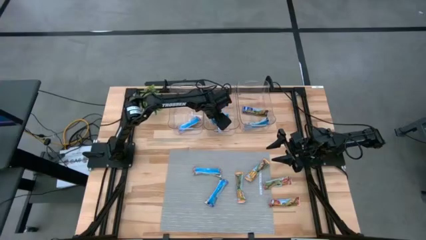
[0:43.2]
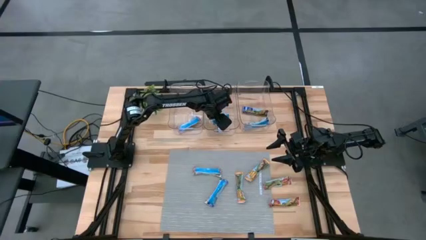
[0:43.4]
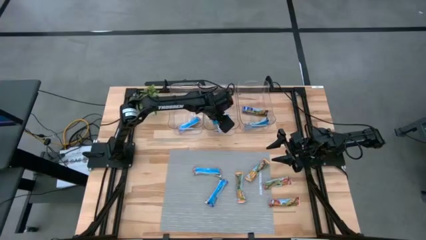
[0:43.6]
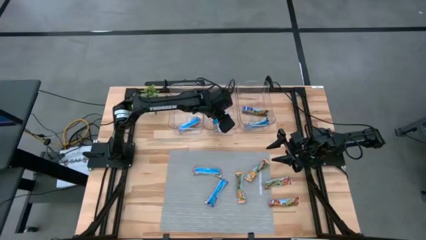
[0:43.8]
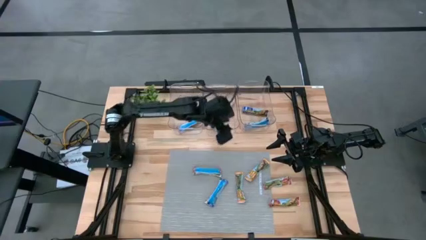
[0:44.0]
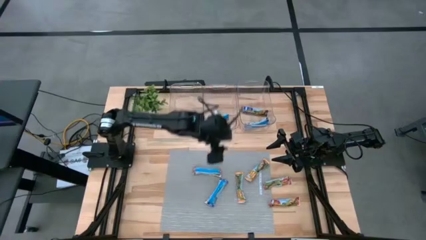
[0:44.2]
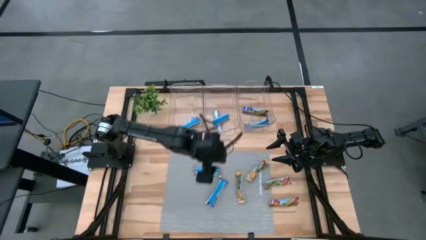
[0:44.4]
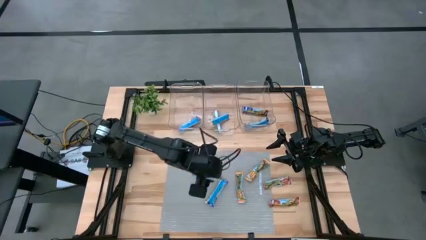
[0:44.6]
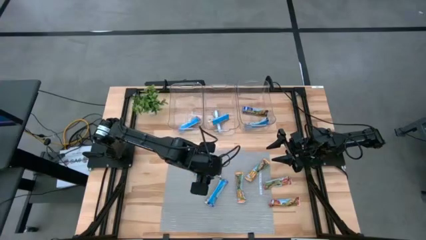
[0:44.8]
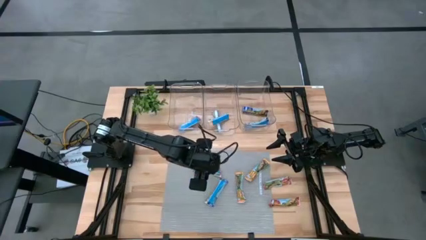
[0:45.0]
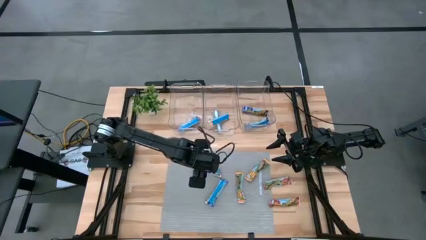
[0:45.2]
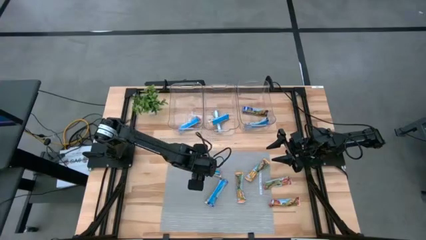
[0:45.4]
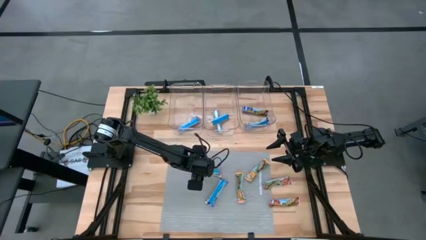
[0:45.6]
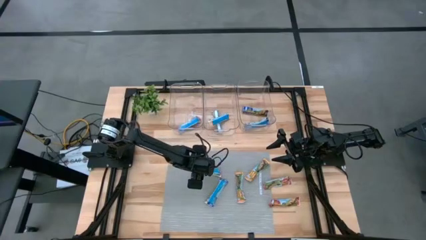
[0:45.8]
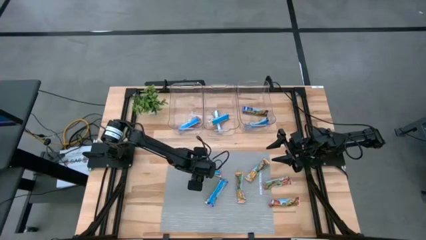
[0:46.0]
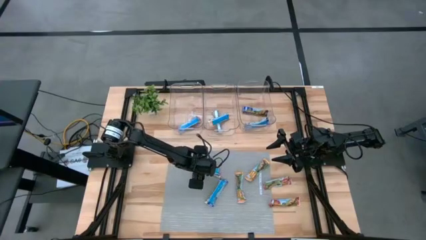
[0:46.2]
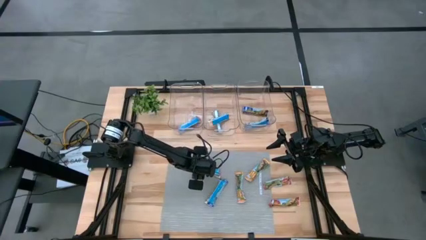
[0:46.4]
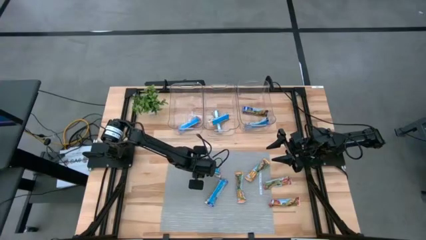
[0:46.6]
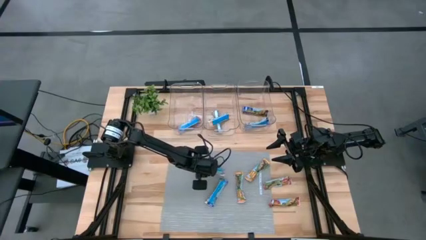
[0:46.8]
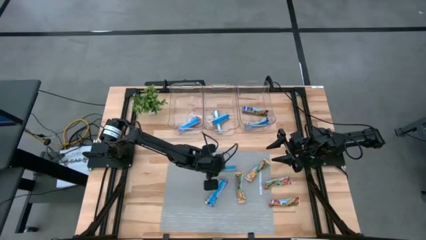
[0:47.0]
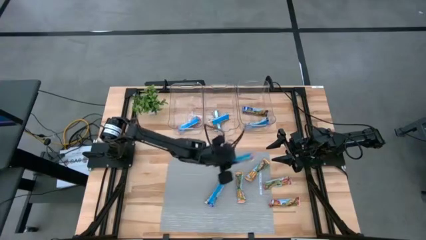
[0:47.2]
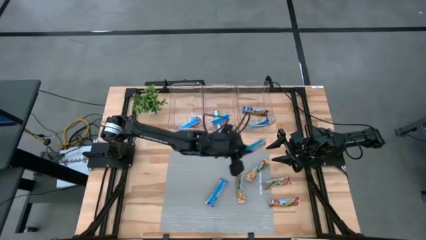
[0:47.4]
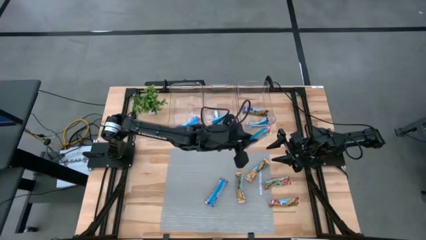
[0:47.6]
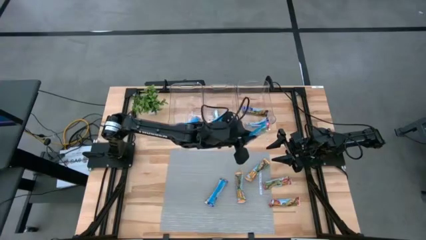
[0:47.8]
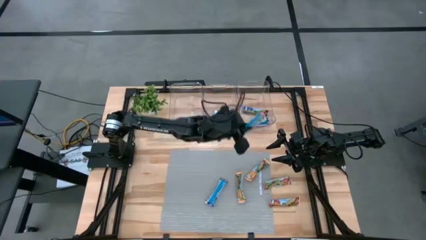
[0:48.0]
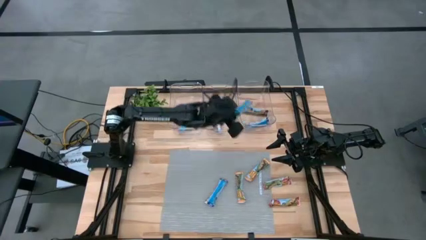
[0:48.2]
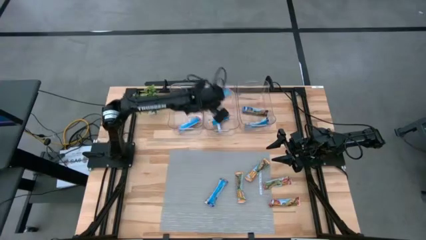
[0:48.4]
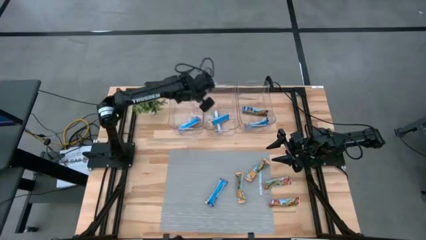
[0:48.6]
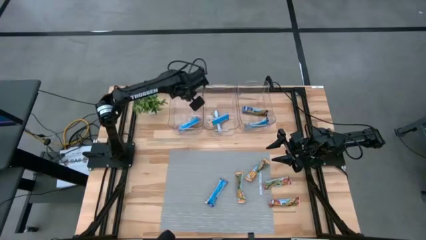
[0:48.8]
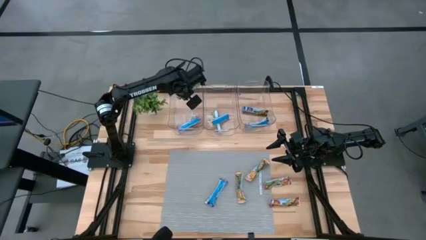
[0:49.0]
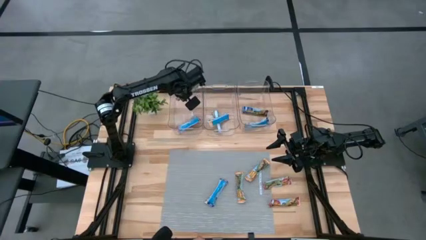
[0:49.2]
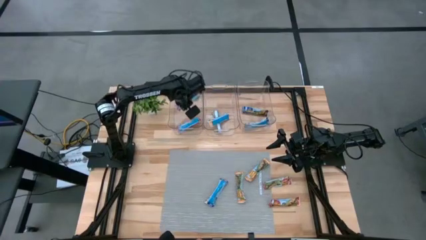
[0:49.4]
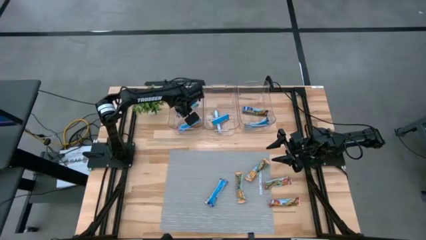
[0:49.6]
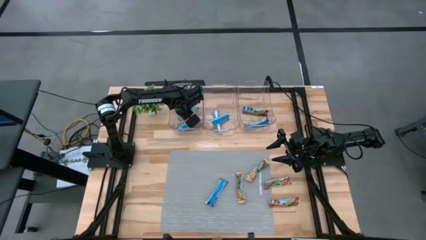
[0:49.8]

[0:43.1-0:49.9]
Task: Pick and place Granola Bars by type
Put the red granola bar into the left transparent bin

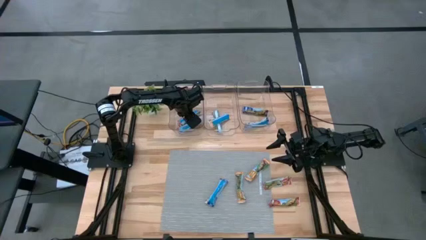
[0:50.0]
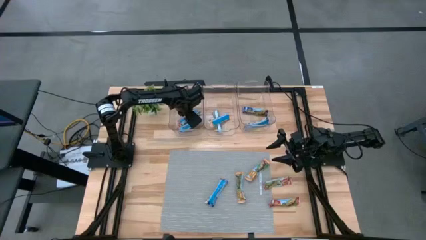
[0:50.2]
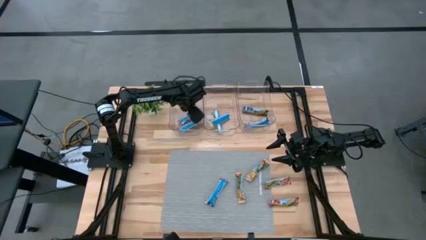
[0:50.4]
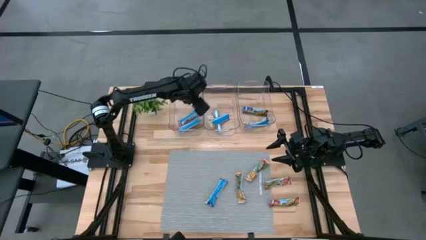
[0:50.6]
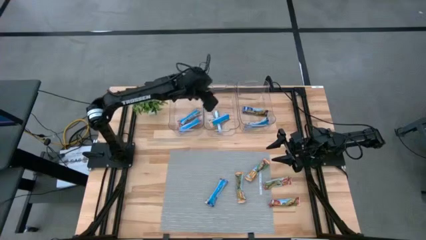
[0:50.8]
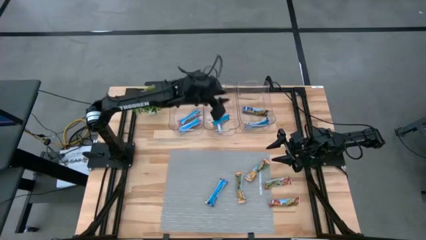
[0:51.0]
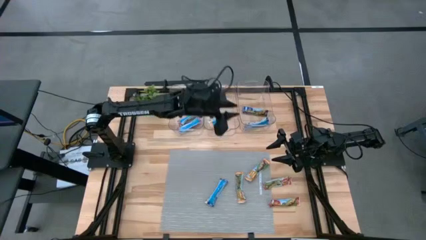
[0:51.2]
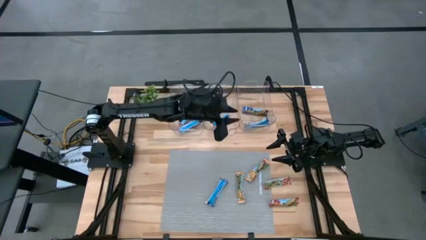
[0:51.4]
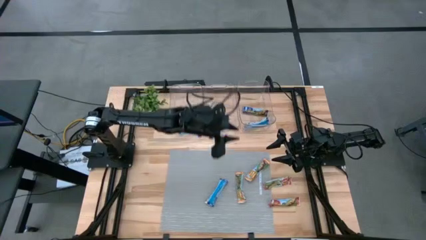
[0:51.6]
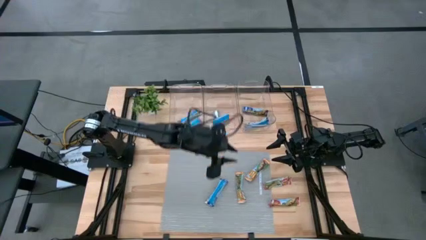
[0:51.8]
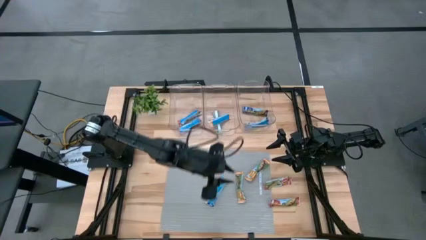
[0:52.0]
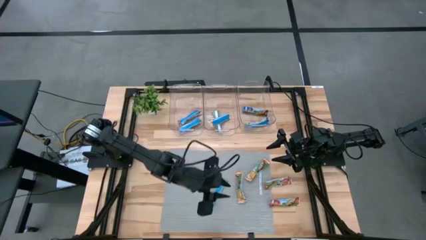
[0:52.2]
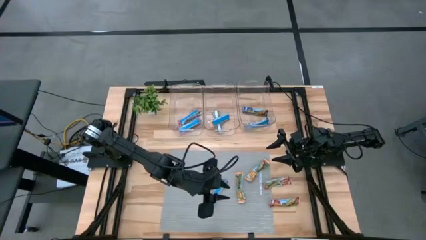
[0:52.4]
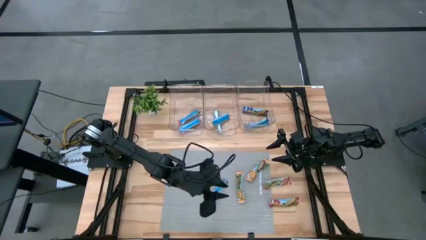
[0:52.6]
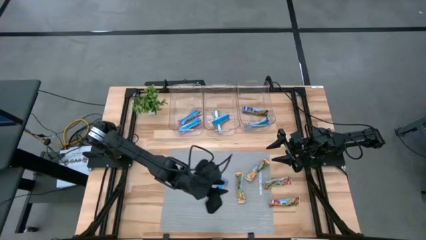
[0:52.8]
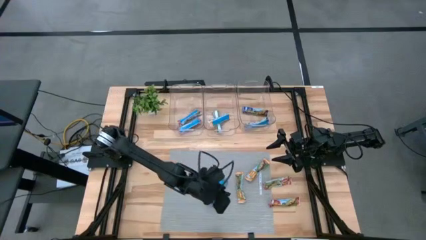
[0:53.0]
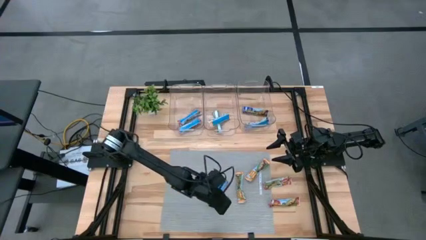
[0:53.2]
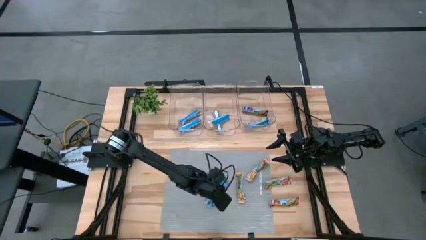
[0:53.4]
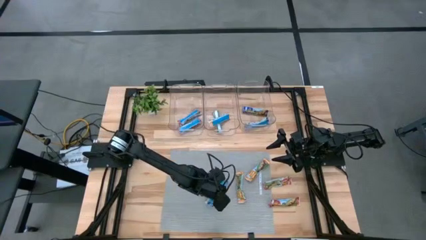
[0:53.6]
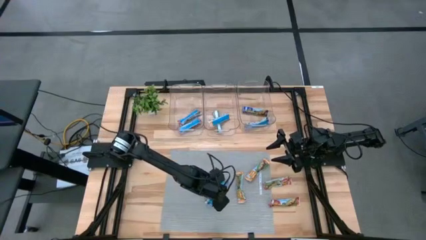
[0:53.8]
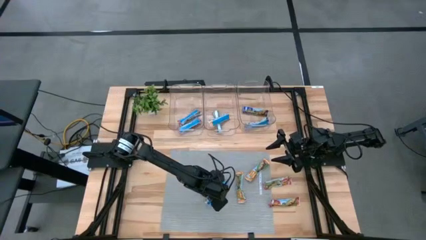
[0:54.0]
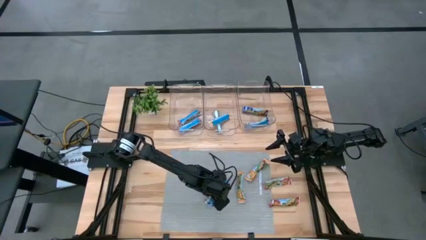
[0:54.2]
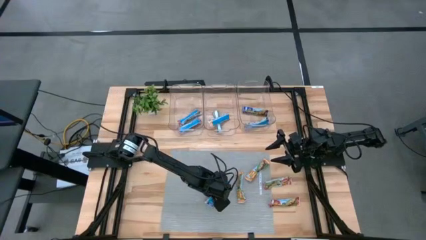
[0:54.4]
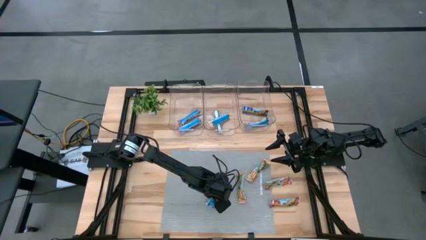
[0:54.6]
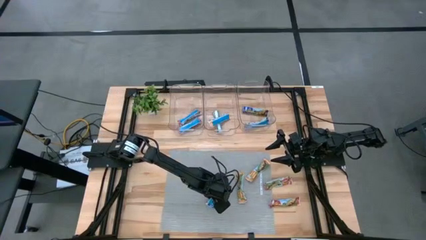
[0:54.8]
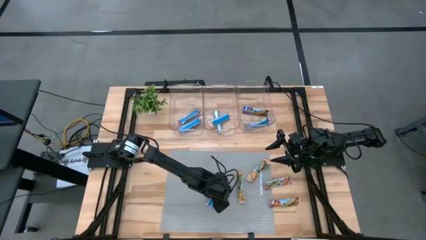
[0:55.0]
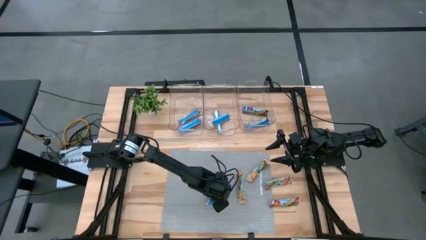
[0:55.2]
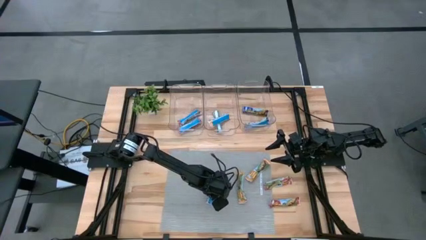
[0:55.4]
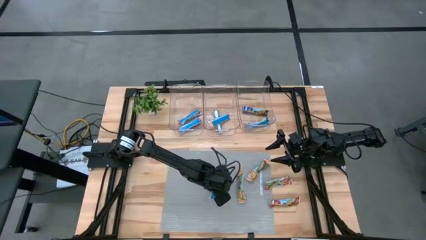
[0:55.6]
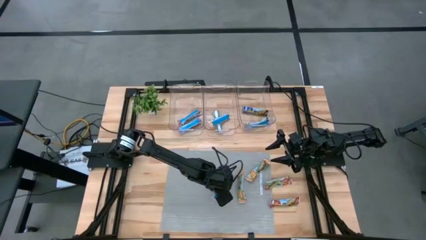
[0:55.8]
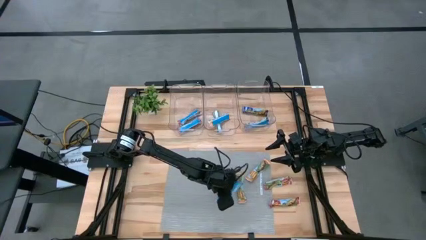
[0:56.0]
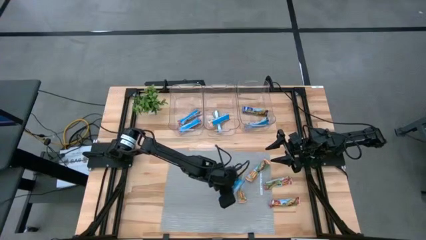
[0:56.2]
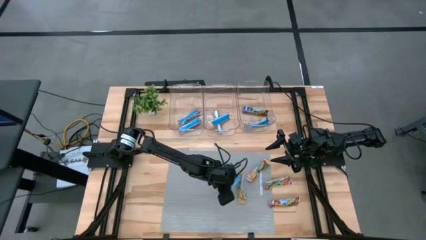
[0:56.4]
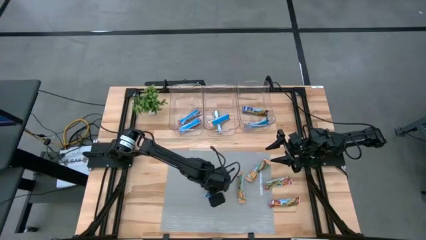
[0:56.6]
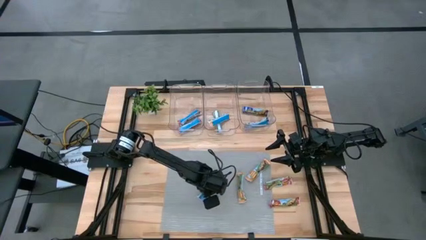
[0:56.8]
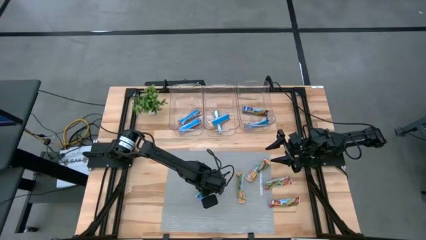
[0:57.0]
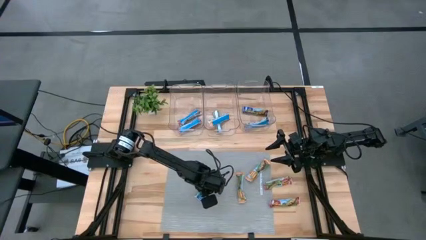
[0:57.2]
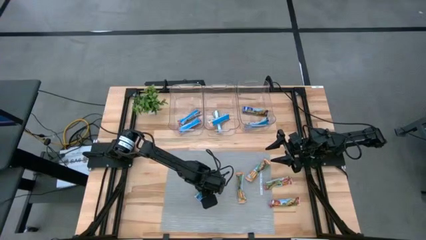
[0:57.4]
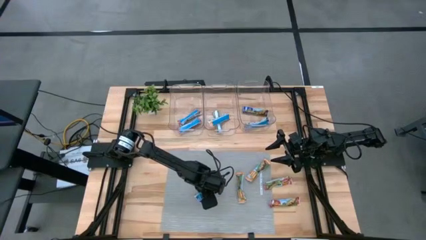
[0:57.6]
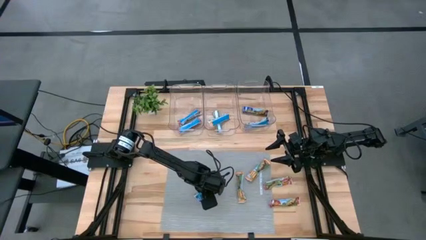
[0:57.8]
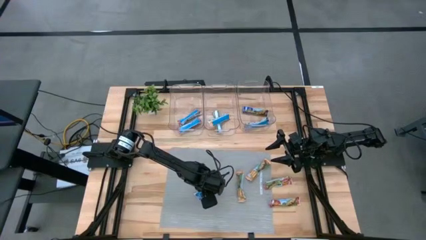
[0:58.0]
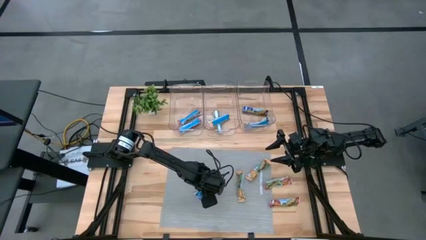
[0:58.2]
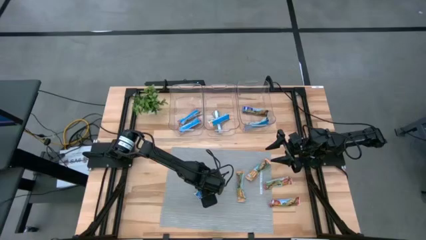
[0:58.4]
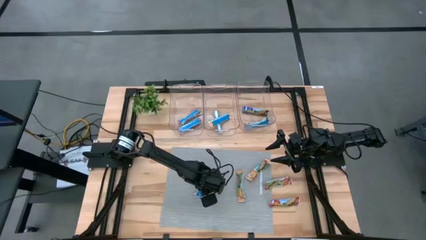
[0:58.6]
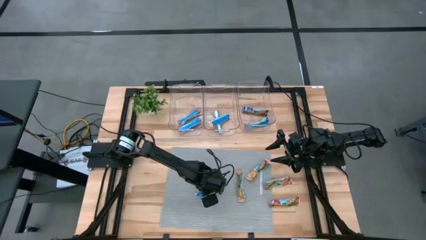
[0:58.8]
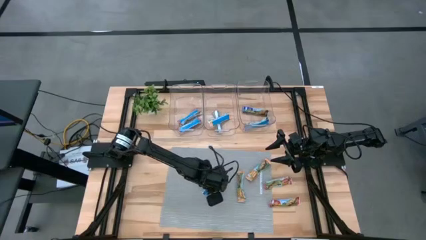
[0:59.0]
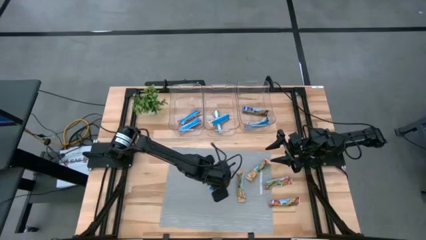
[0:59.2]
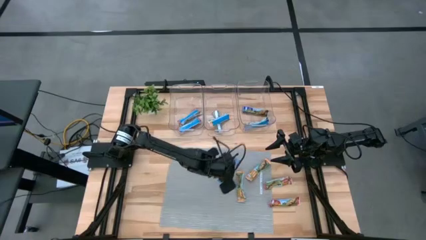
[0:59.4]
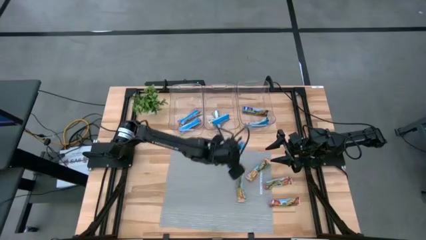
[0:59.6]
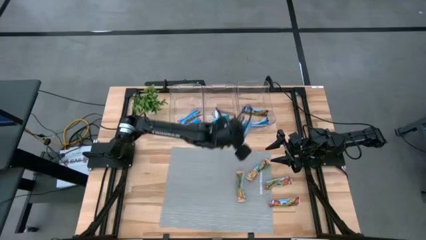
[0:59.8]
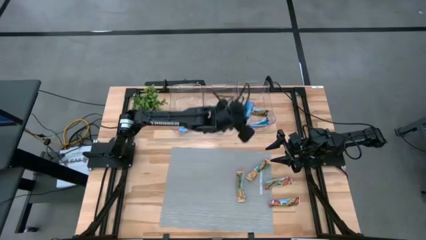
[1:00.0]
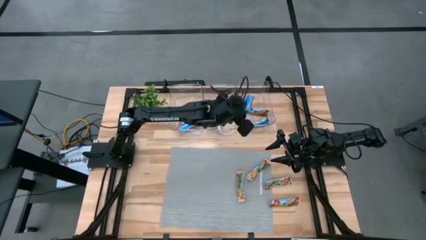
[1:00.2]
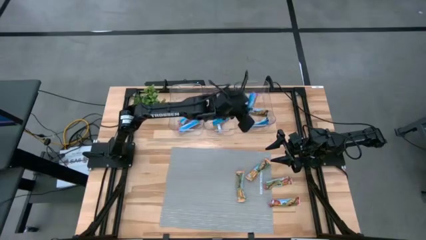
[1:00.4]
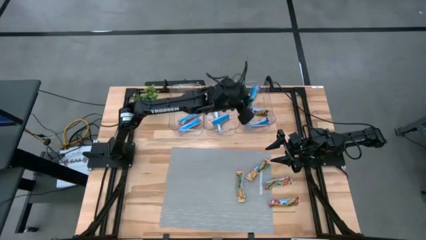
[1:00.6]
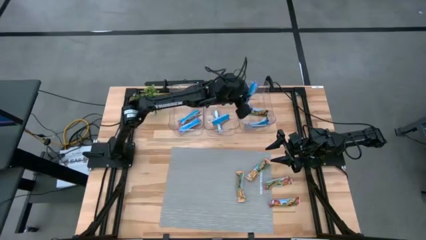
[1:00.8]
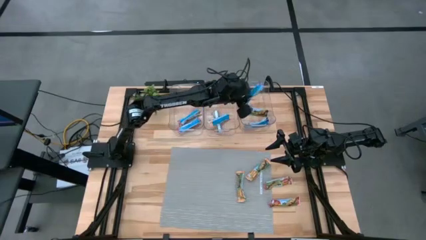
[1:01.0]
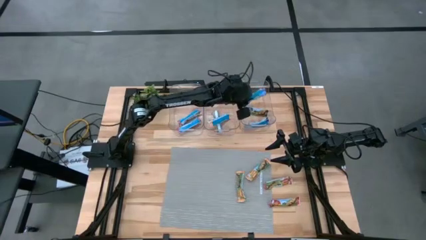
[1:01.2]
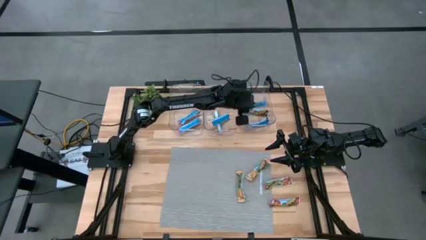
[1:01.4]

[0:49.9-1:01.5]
Put the blue granola bar into the right transparent bin
